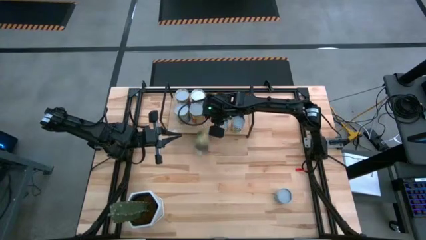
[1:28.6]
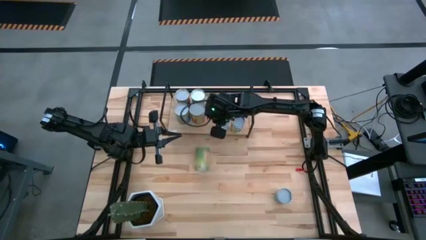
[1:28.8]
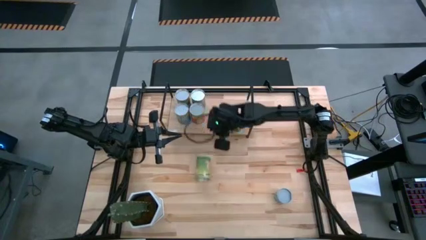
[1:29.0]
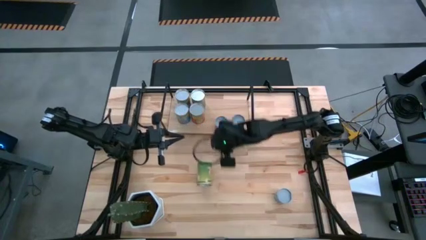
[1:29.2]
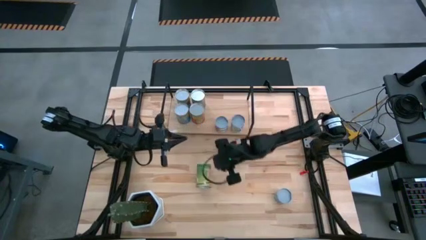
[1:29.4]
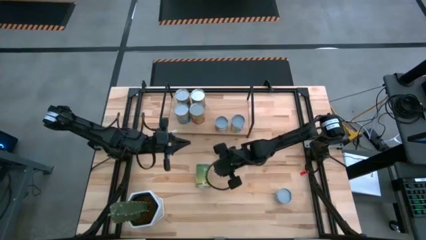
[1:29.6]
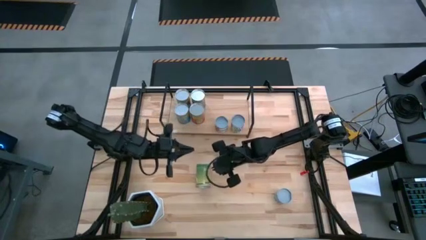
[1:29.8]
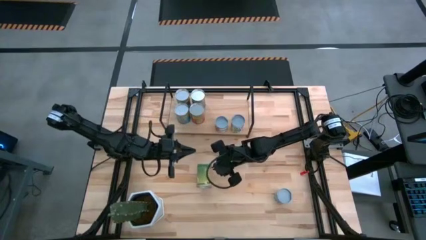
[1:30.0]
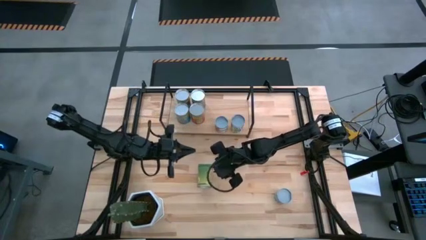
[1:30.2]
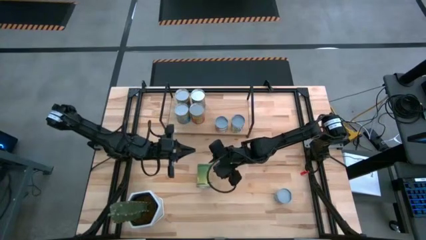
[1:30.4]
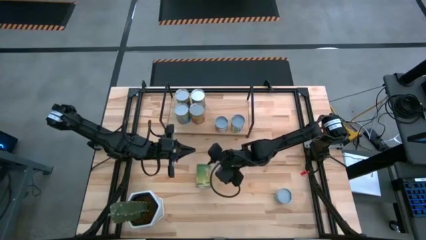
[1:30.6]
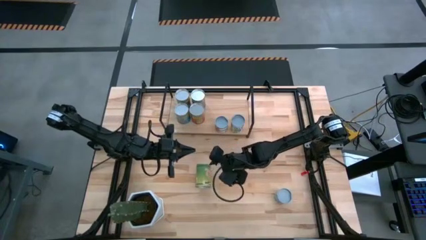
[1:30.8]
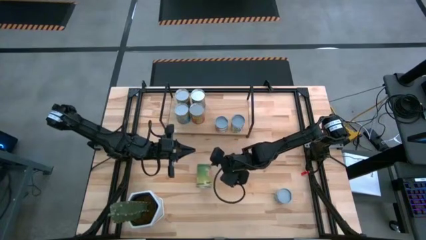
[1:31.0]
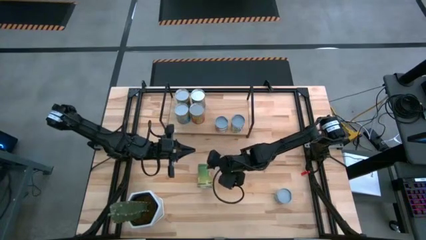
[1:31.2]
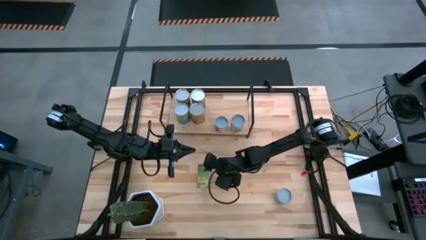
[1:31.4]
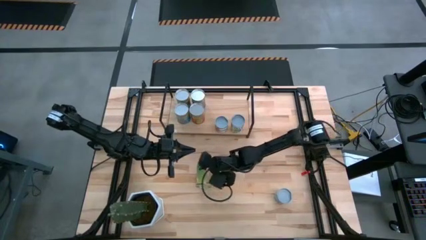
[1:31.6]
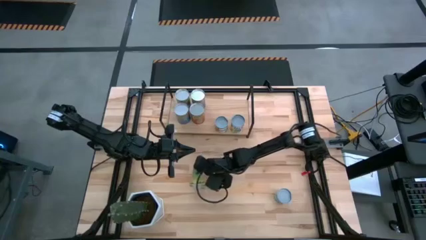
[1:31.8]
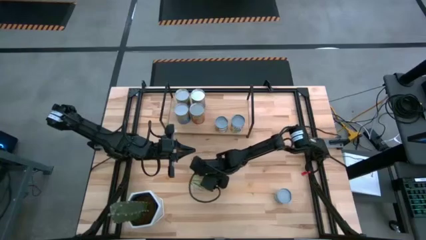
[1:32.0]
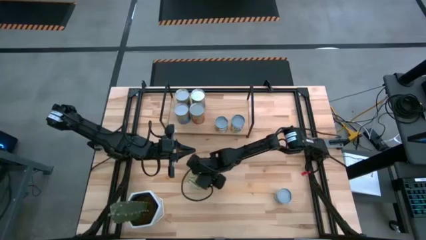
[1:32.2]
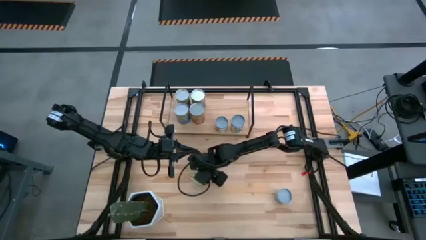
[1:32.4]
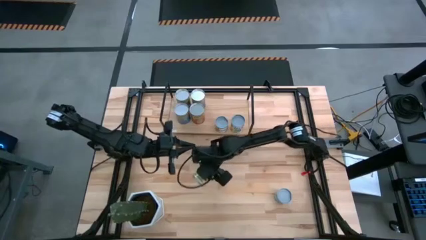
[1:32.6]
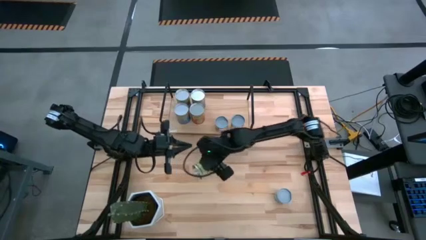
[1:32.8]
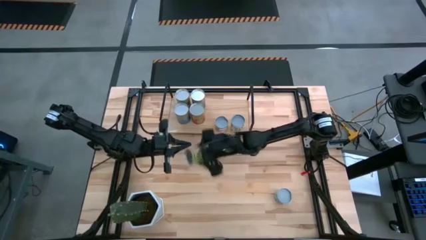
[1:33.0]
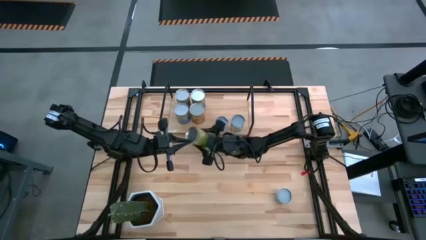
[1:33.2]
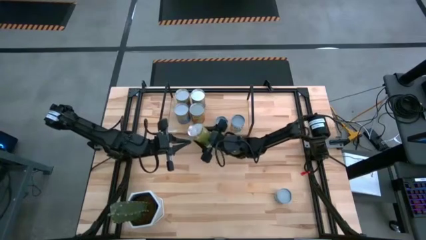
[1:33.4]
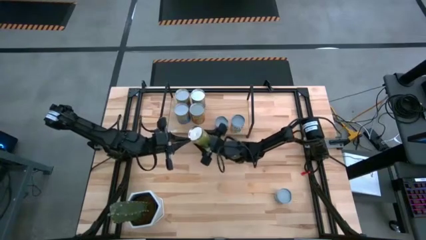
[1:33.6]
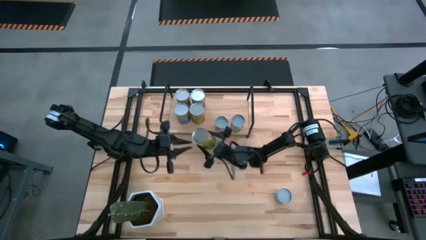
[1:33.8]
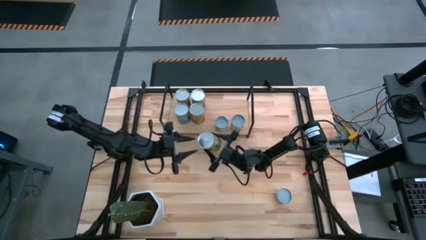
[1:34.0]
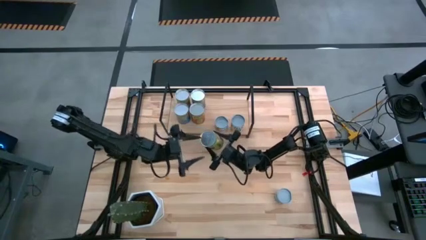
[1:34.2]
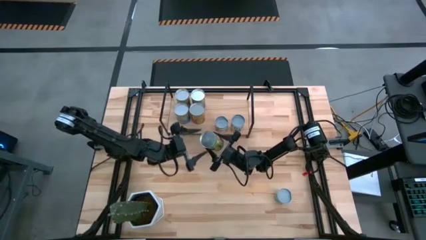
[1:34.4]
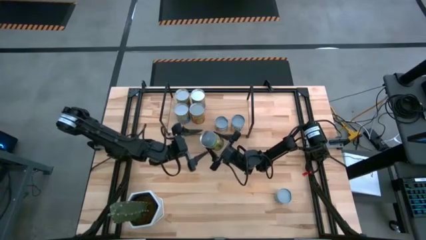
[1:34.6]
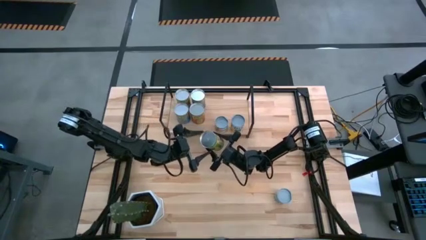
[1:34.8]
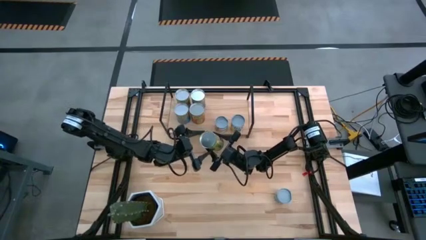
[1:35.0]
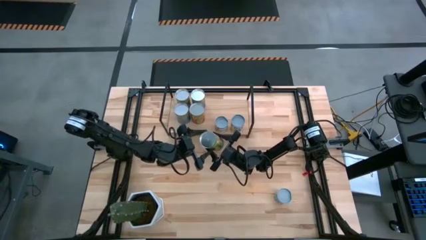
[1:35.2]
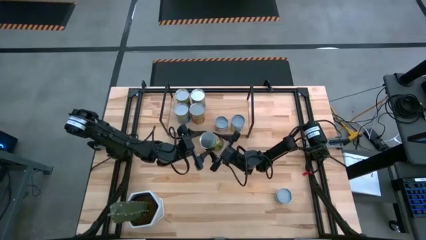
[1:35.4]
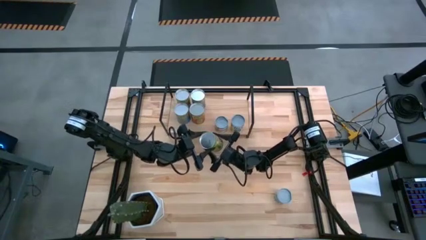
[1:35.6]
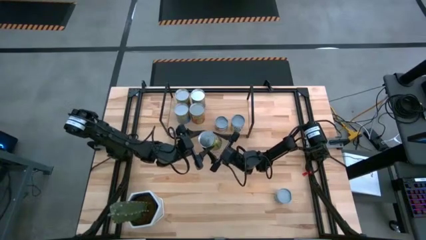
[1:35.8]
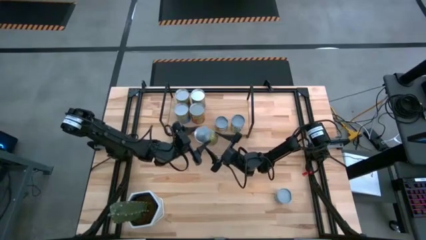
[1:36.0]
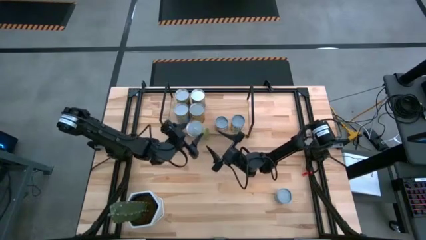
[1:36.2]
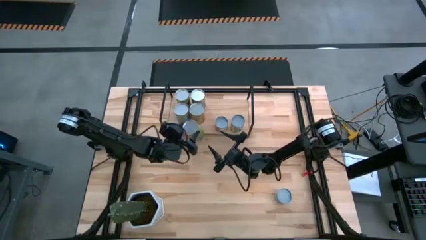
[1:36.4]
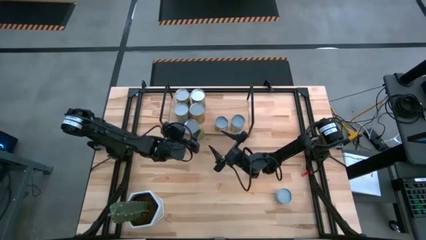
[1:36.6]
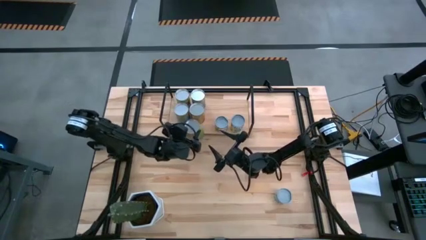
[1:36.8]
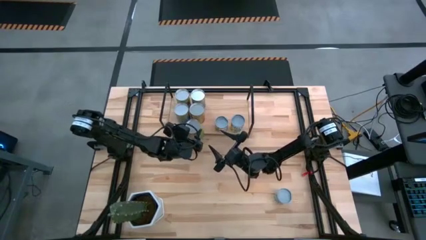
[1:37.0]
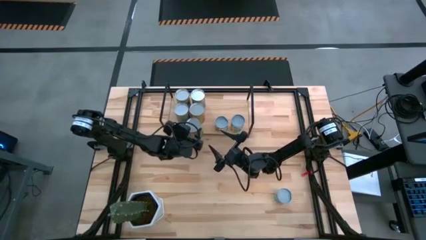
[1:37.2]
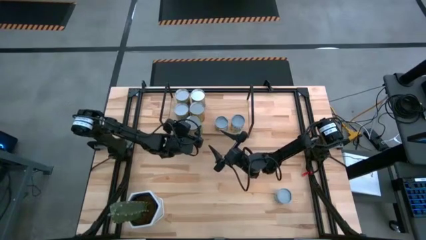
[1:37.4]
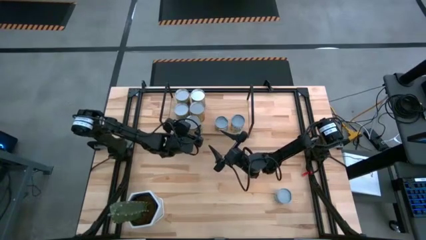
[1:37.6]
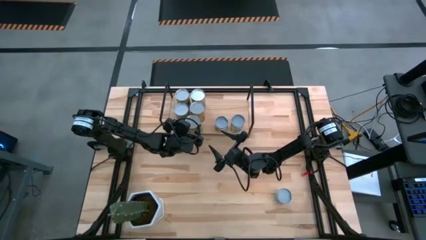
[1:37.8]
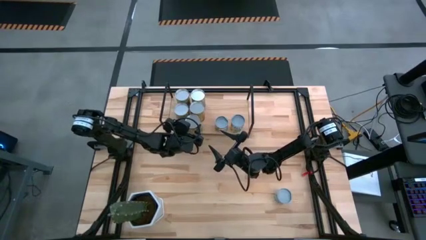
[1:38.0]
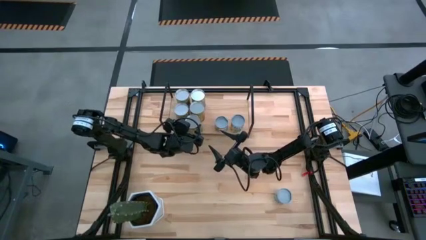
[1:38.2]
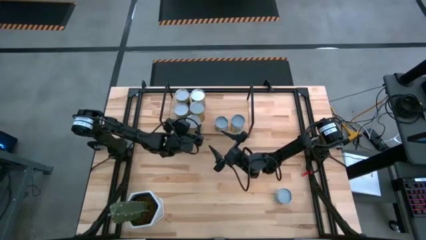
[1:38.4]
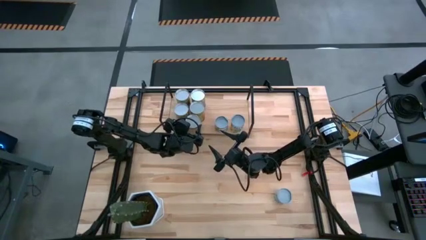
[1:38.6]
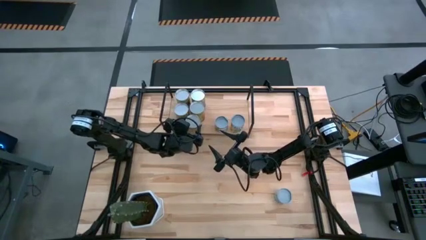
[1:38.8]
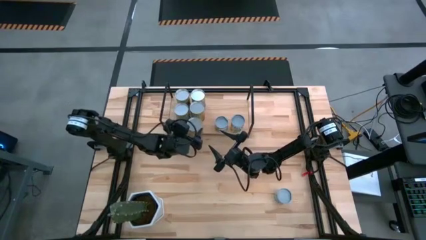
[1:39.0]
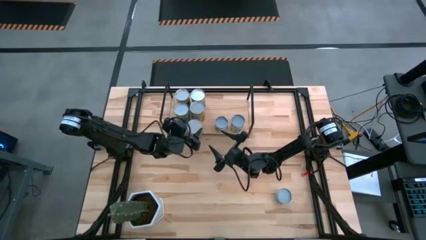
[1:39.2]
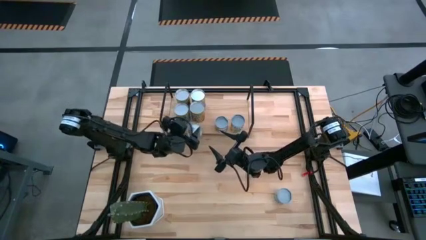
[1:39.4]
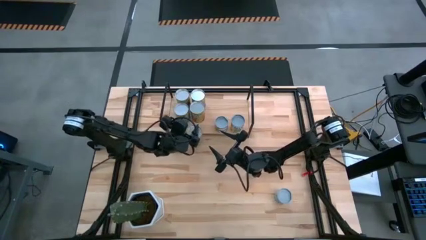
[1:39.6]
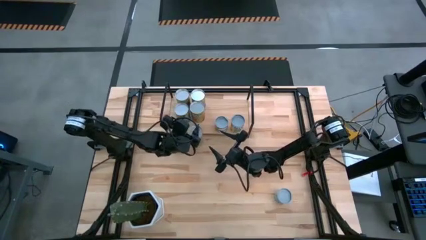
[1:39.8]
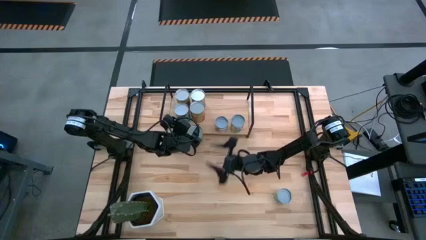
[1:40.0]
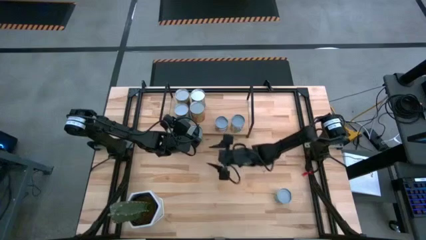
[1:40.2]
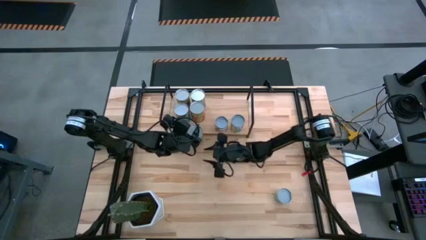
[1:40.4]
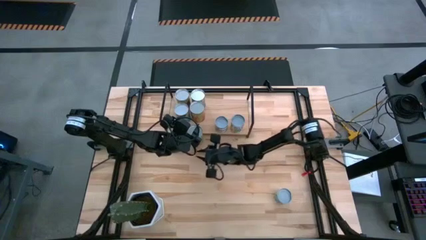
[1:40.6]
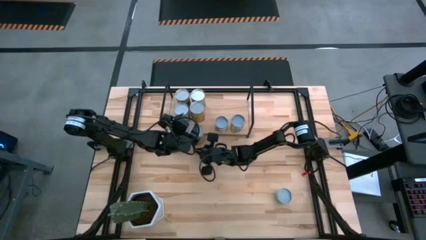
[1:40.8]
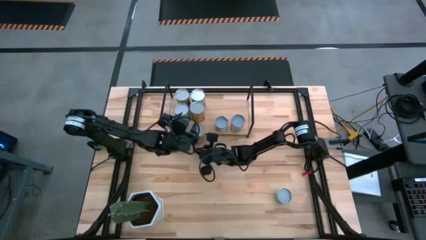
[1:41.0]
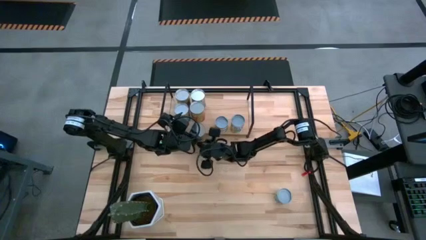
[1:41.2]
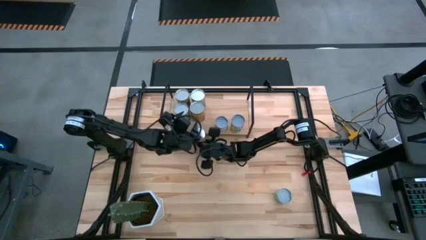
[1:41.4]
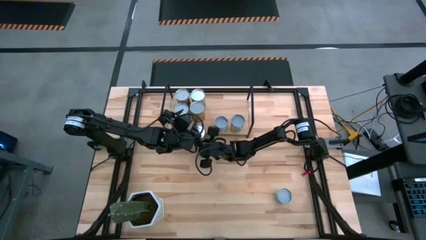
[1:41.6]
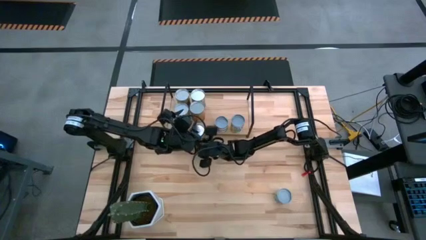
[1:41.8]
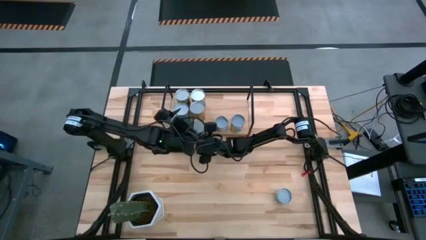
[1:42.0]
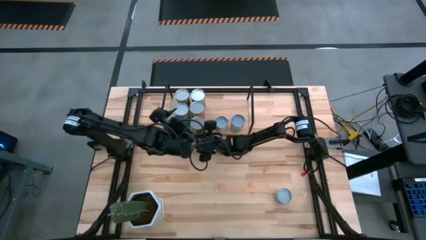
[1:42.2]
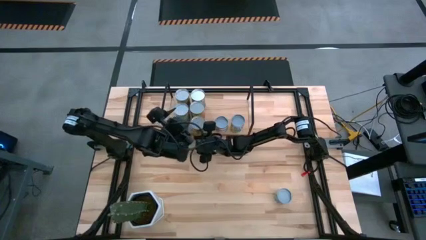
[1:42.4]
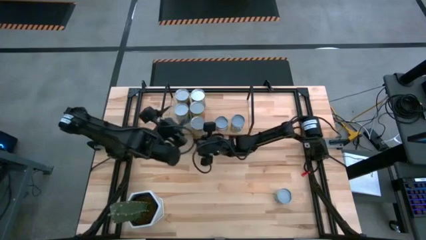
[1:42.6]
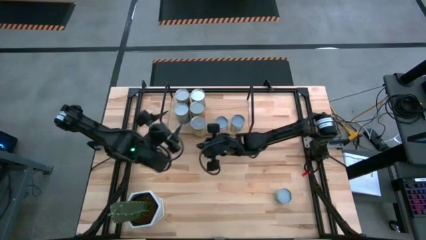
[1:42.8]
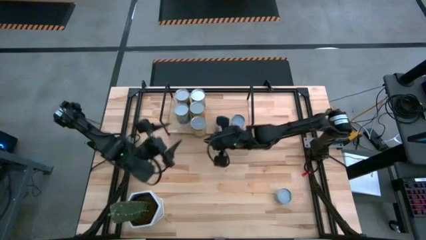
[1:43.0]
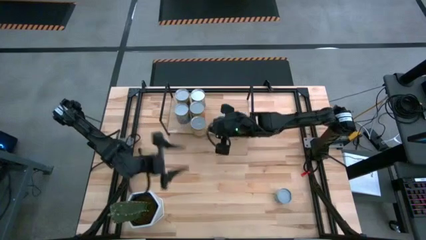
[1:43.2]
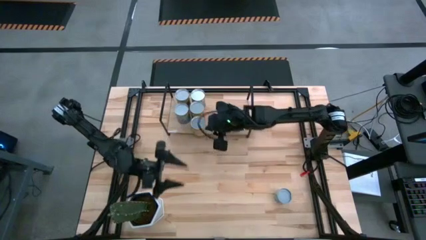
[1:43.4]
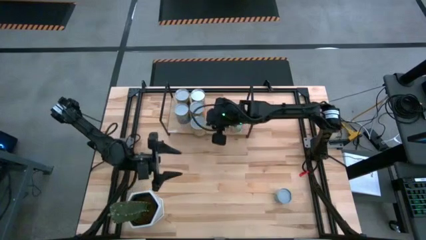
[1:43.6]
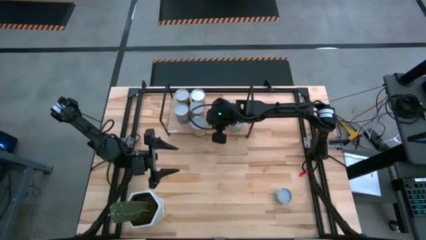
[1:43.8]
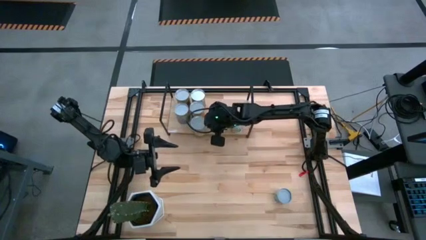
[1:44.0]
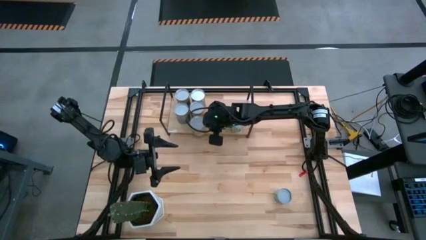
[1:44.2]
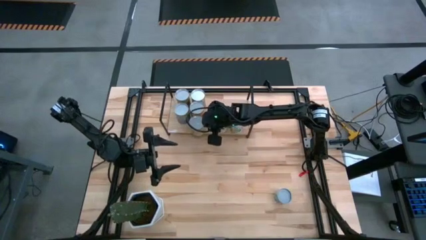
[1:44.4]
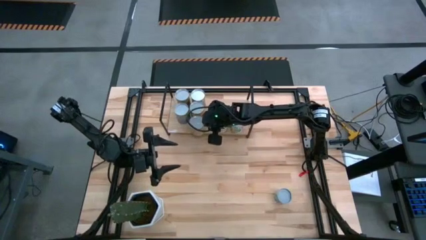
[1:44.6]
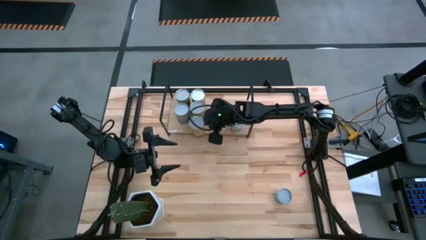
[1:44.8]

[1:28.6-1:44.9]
Task: Pick and place cans onto a shelf
Put the large canned oranges on the shelf
